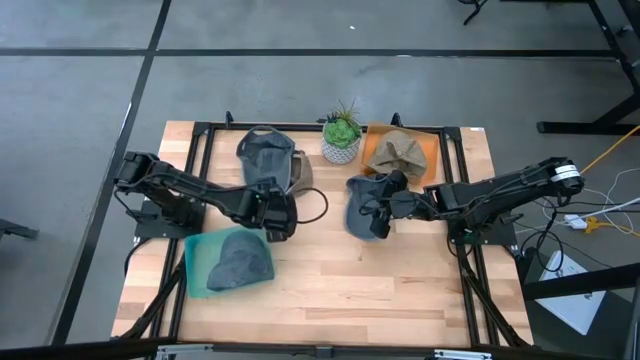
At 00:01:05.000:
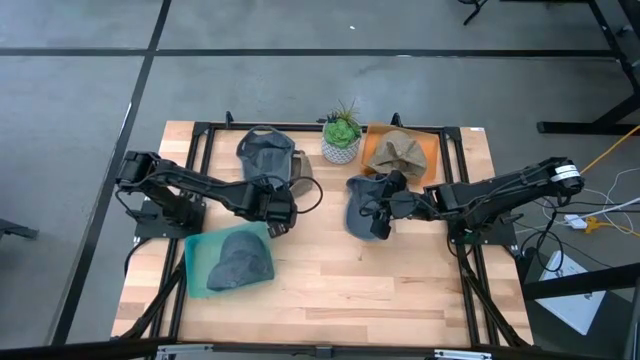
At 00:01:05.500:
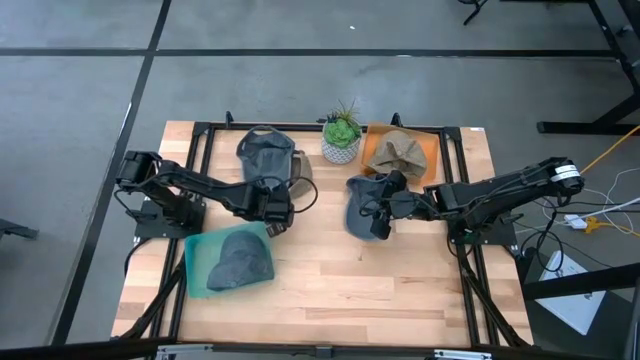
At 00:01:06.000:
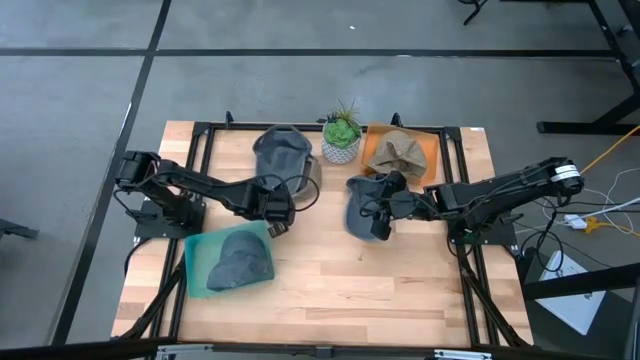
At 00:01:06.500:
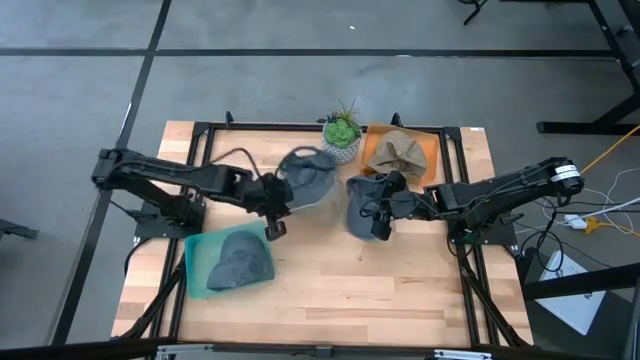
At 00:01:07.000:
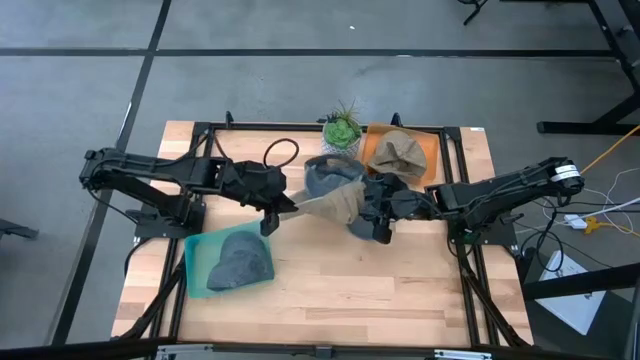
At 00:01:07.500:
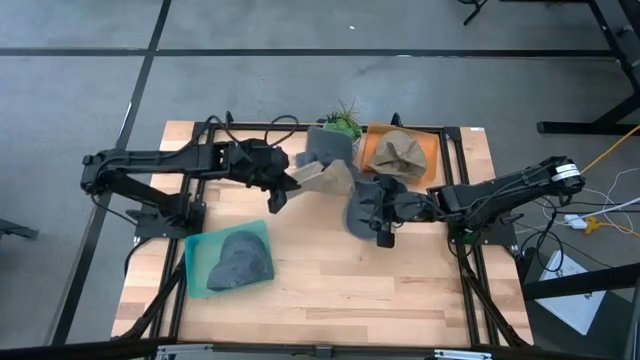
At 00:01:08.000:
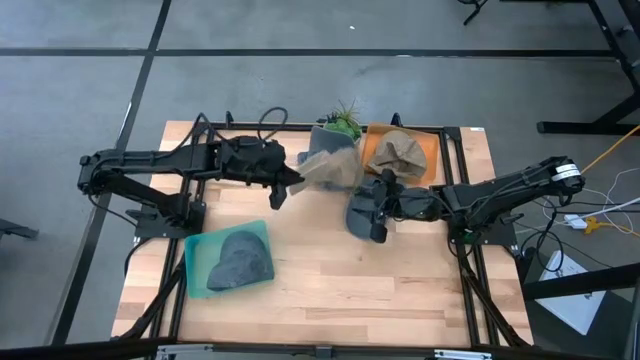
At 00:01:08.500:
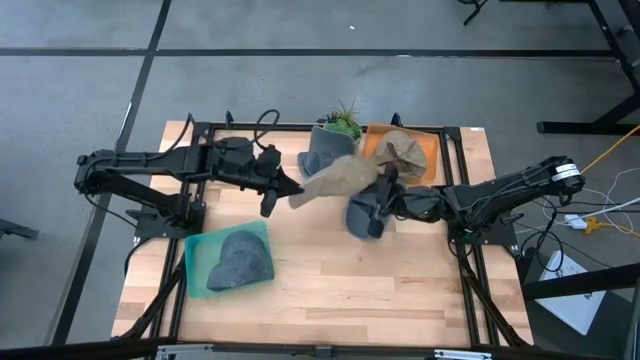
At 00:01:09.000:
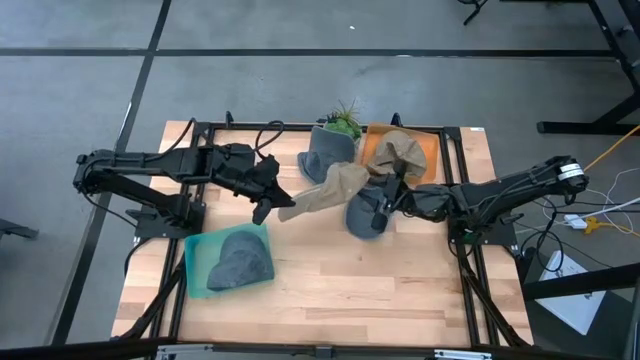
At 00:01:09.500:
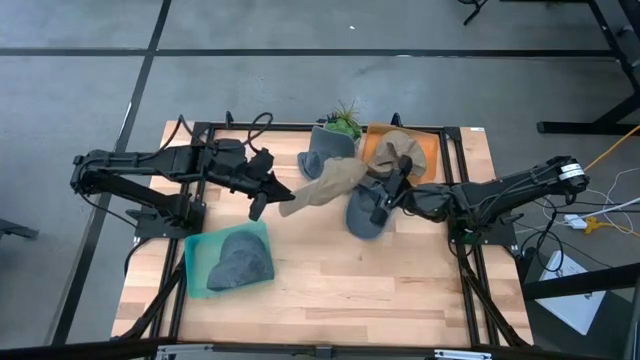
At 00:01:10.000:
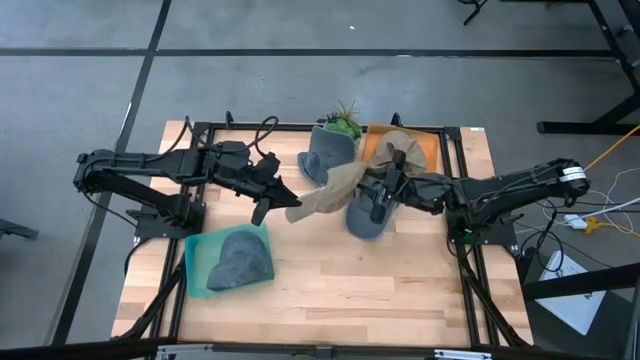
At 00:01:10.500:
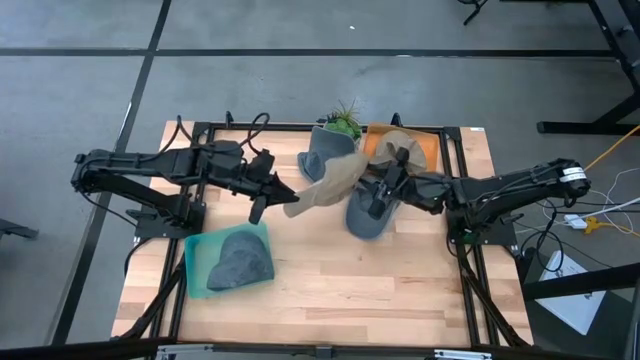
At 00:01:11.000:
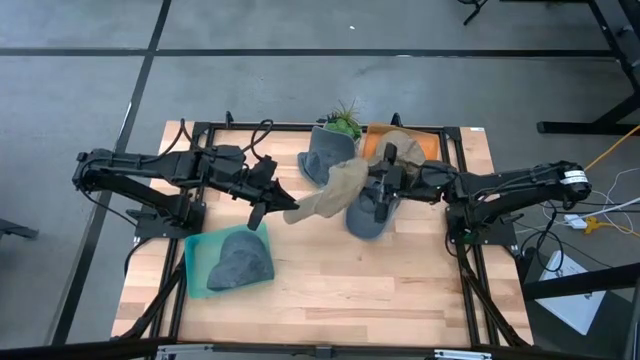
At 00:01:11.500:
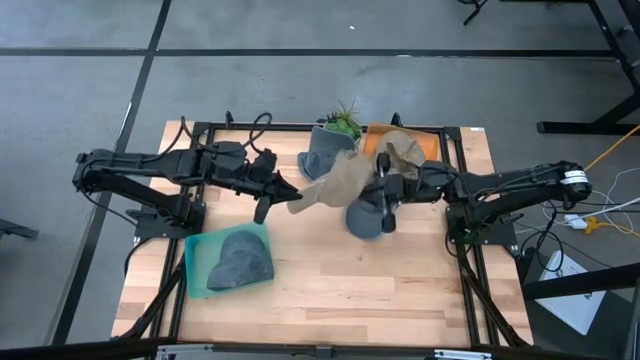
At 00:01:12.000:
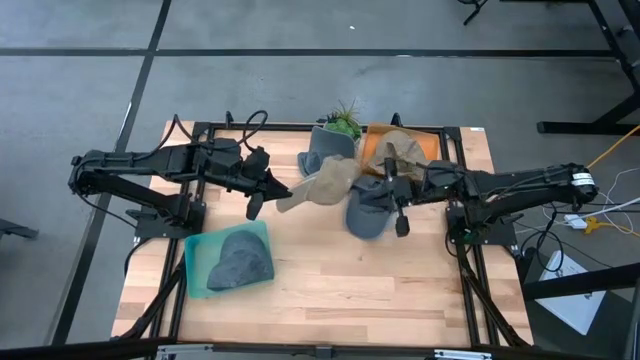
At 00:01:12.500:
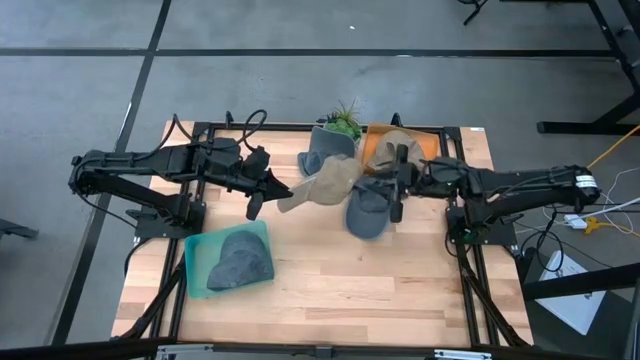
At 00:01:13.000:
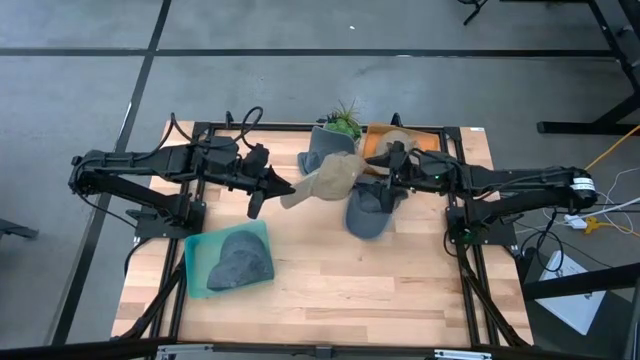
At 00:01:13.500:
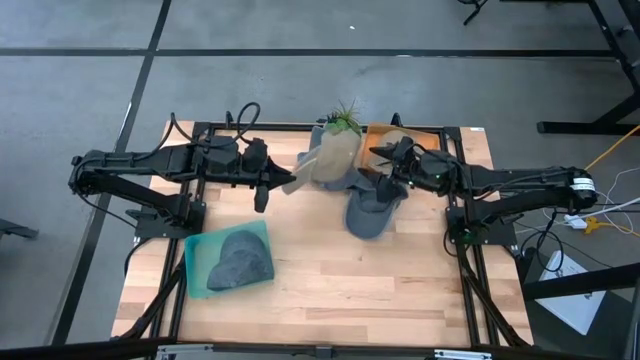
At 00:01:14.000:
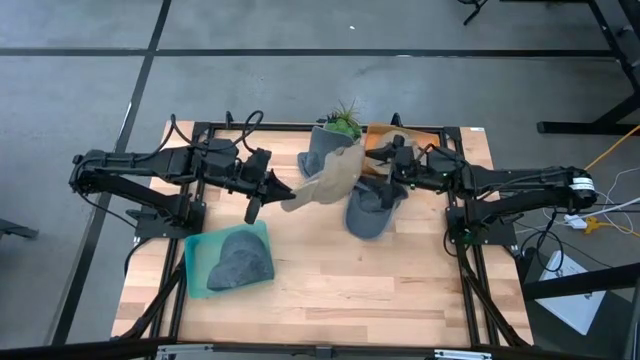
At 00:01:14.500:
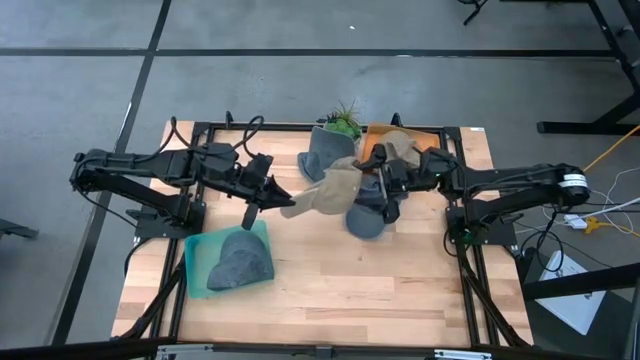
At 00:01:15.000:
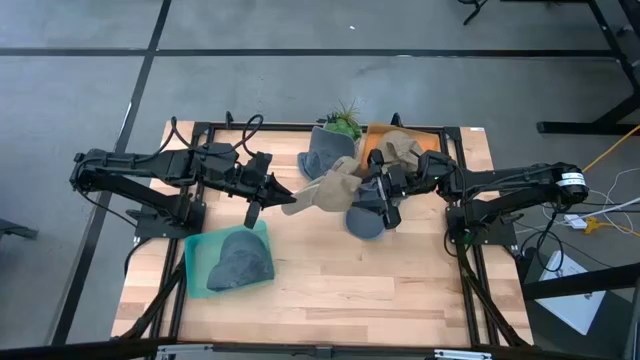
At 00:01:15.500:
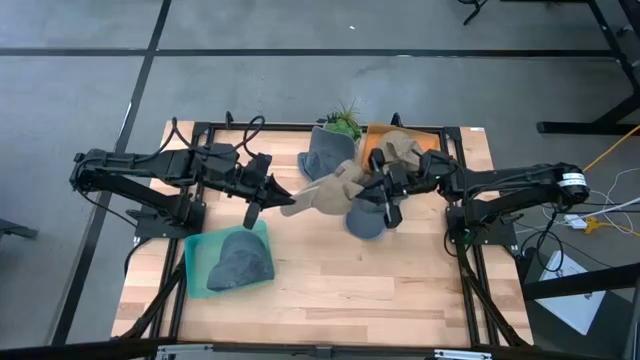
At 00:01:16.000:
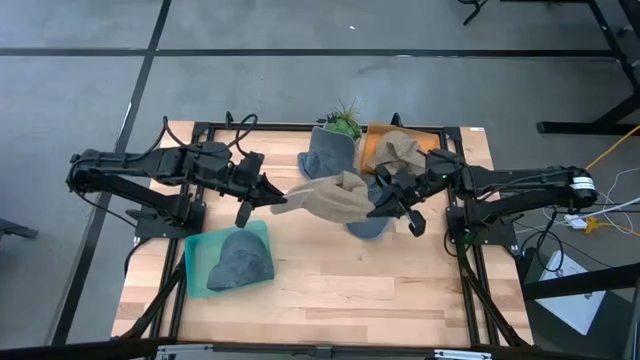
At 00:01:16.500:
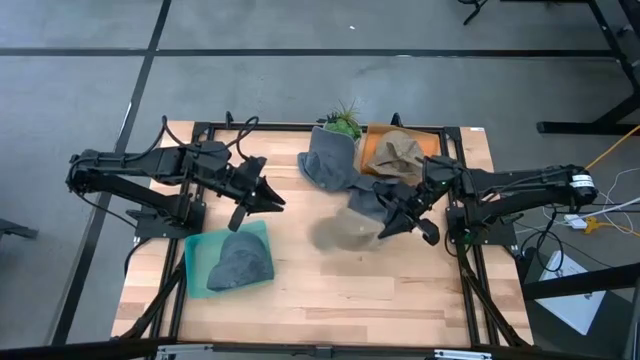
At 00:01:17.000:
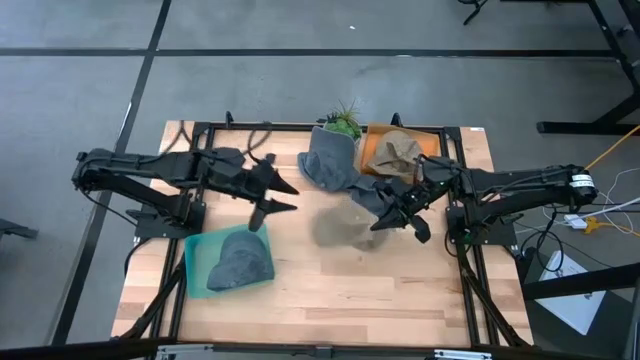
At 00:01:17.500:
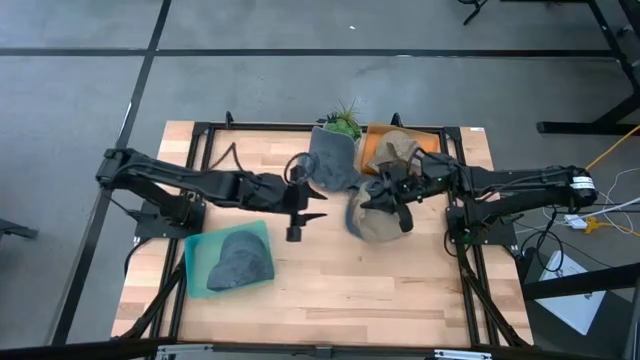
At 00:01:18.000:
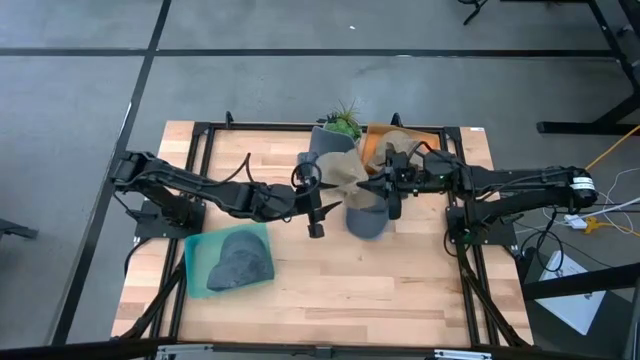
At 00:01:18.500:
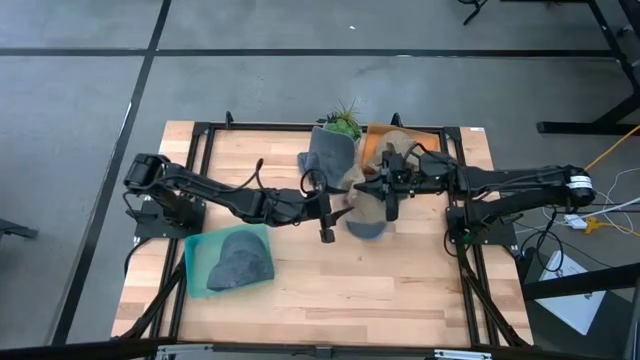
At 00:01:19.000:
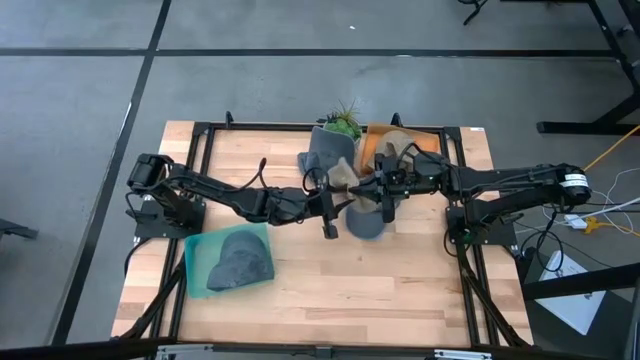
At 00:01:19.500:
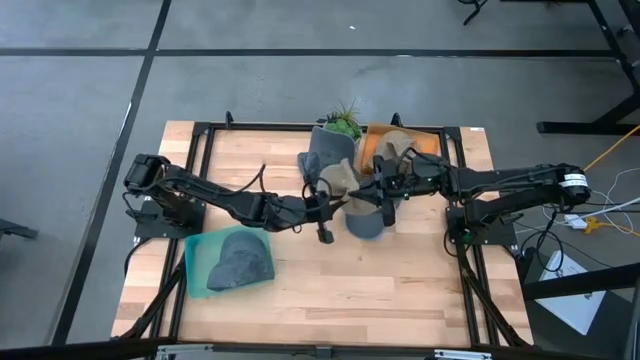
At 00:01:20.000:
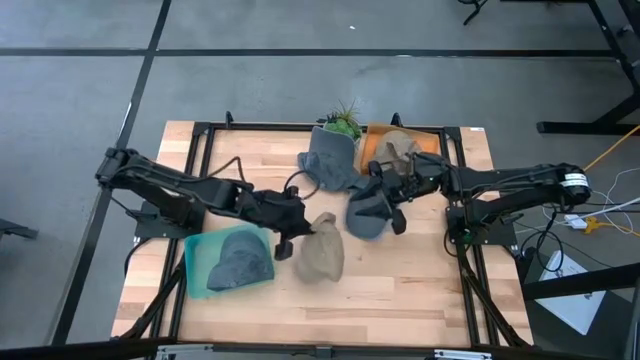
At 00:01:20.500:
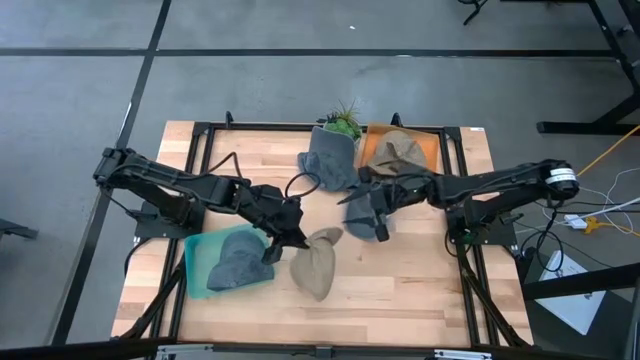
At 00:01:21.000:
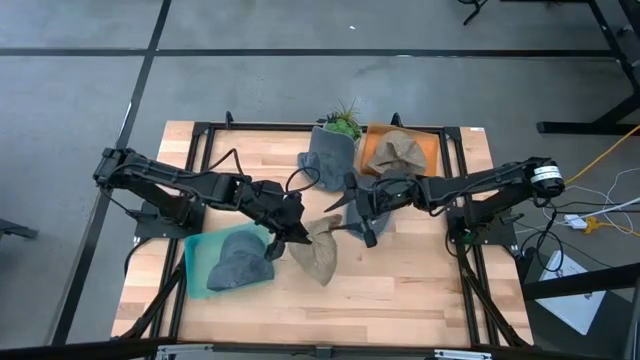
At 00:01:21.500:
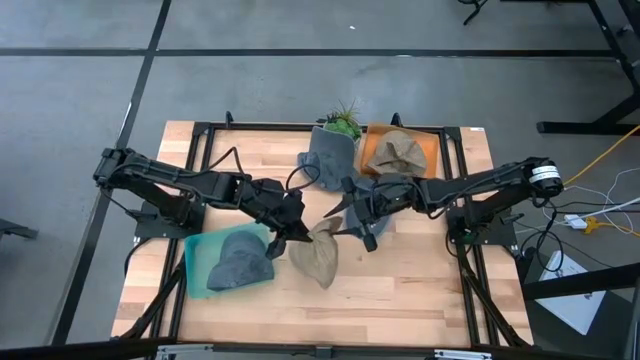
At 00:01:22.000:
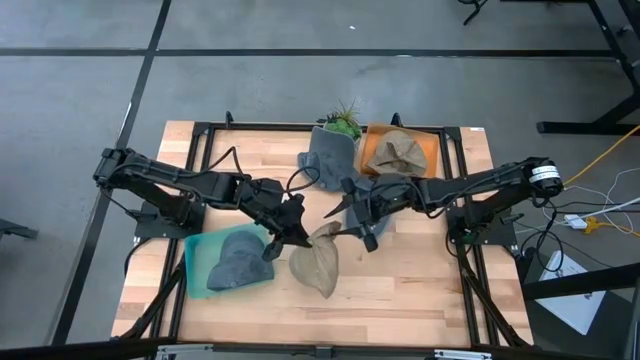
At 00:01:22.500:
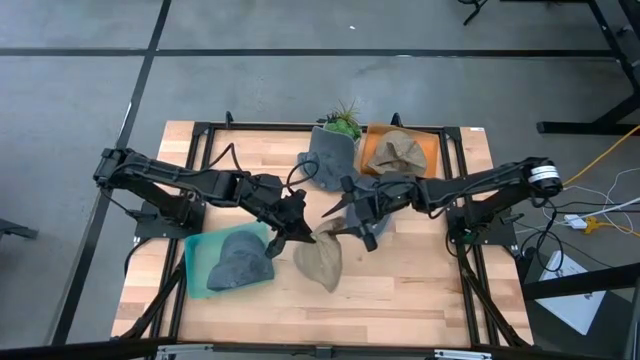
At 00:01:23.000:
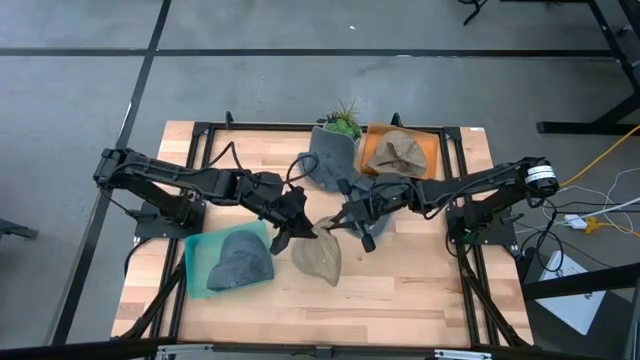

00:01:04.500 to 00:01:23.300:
Task: Pick & Place hat
Put the brown cap into the orange bin
